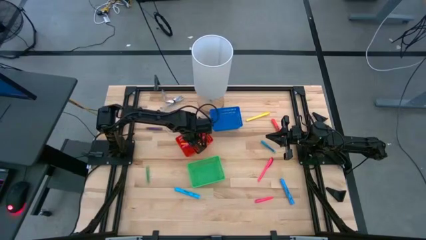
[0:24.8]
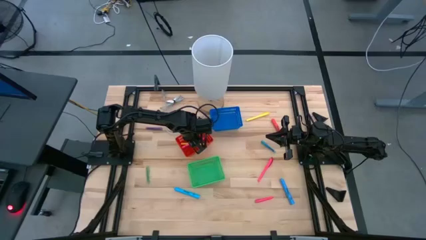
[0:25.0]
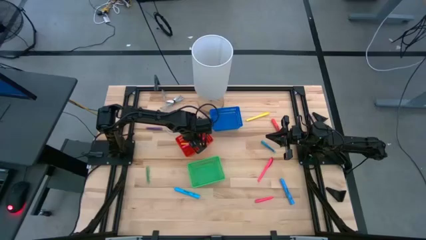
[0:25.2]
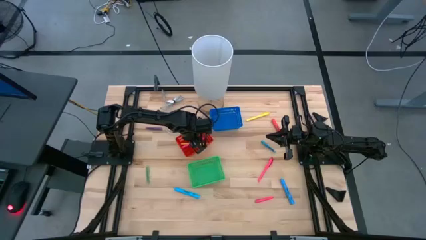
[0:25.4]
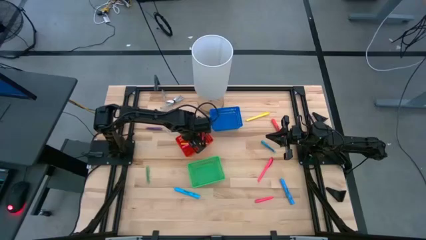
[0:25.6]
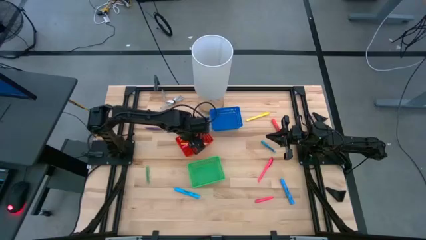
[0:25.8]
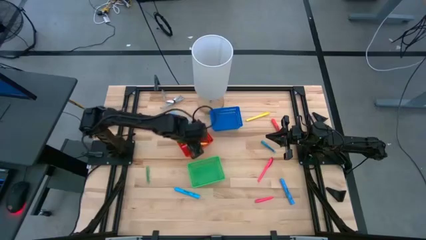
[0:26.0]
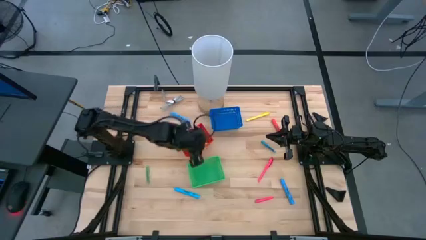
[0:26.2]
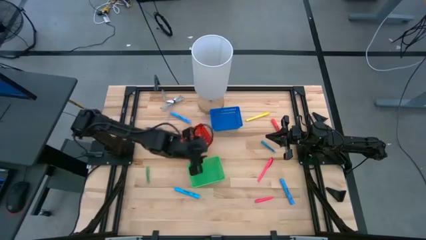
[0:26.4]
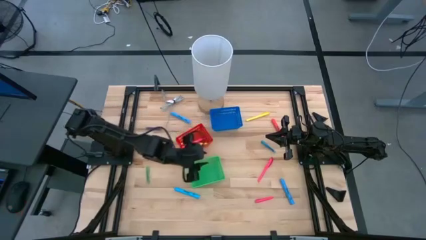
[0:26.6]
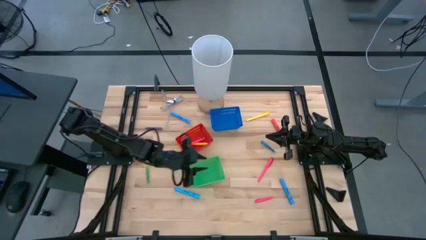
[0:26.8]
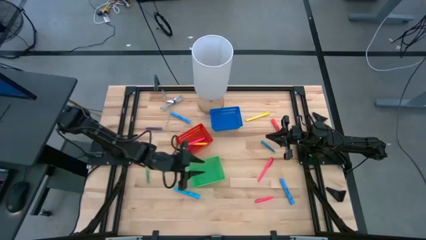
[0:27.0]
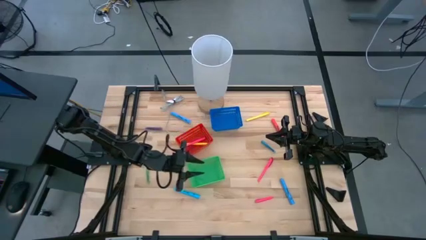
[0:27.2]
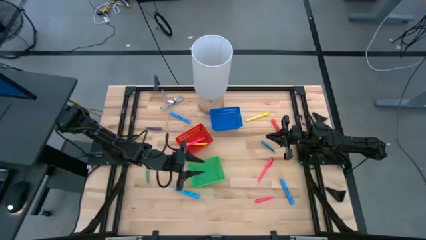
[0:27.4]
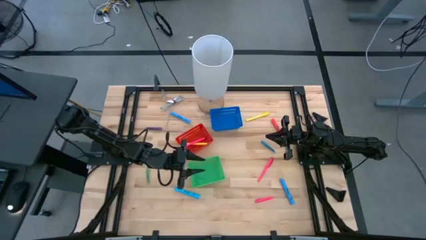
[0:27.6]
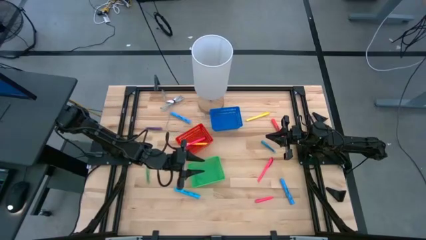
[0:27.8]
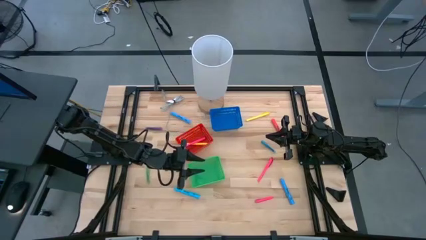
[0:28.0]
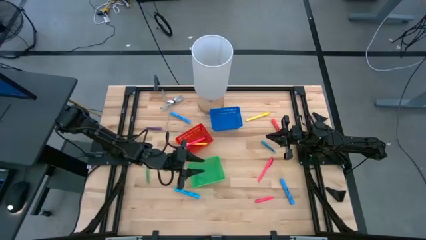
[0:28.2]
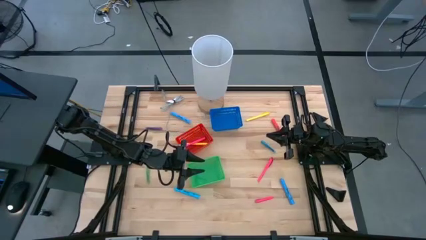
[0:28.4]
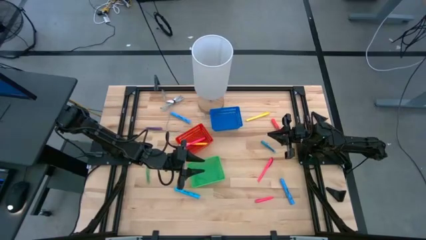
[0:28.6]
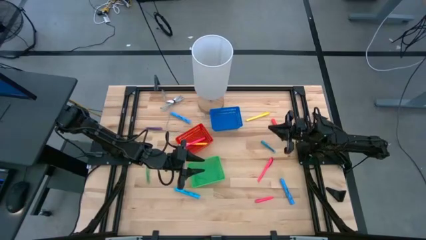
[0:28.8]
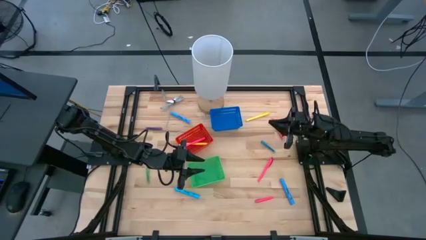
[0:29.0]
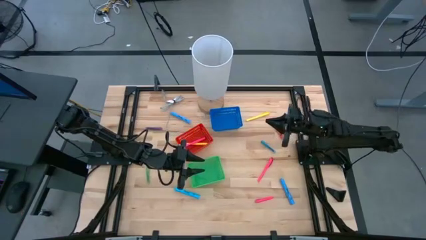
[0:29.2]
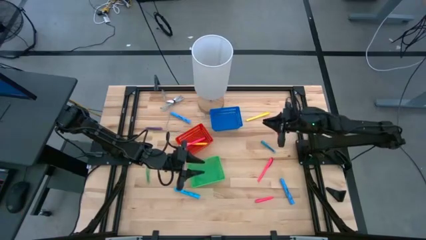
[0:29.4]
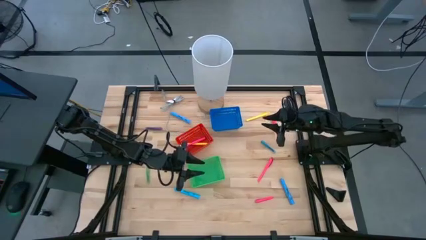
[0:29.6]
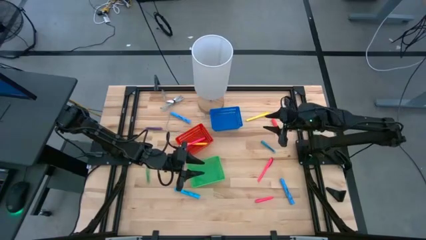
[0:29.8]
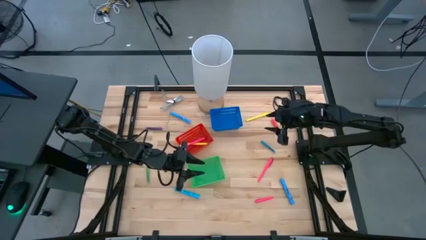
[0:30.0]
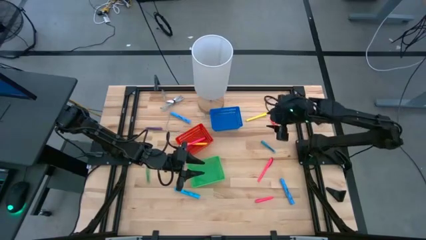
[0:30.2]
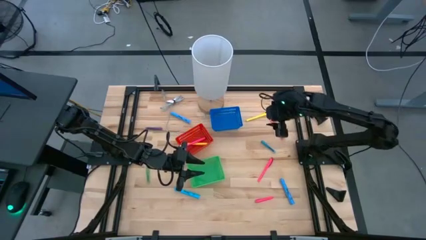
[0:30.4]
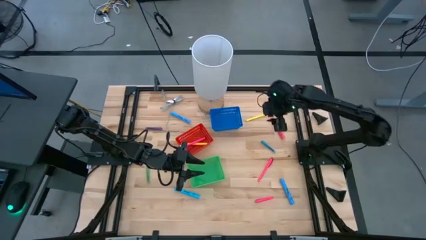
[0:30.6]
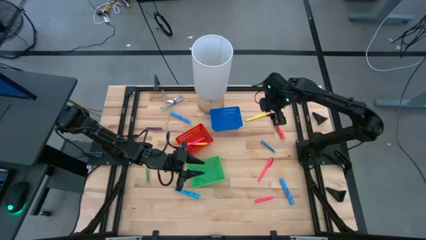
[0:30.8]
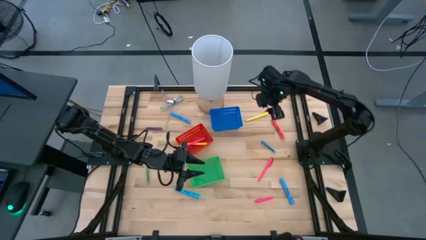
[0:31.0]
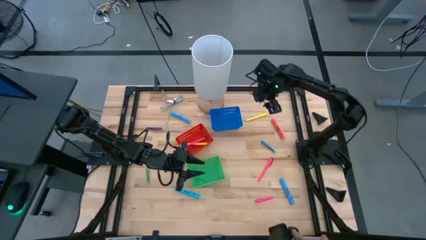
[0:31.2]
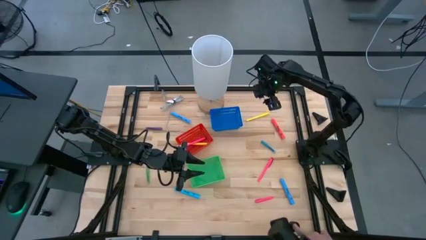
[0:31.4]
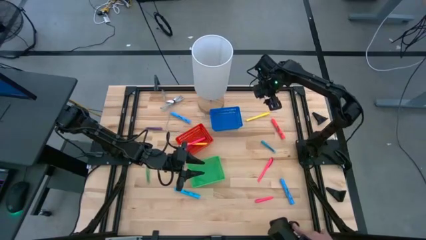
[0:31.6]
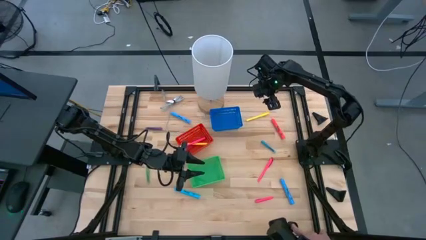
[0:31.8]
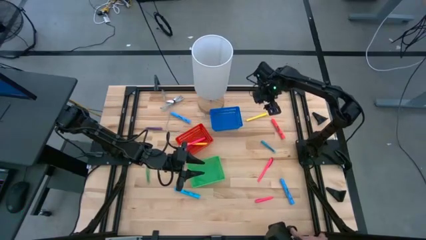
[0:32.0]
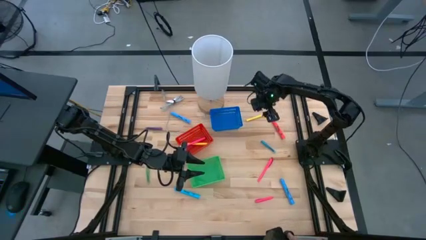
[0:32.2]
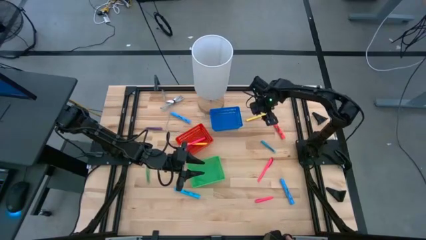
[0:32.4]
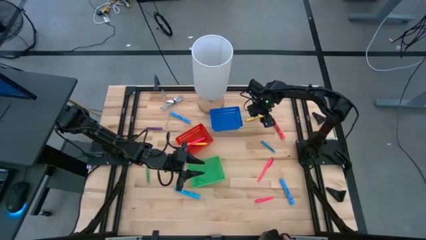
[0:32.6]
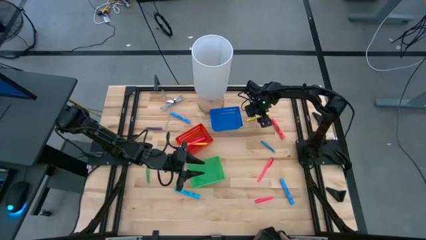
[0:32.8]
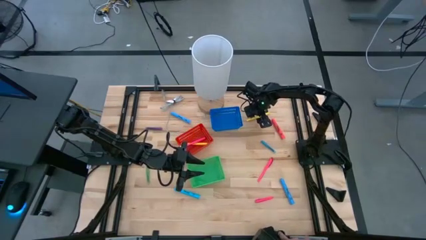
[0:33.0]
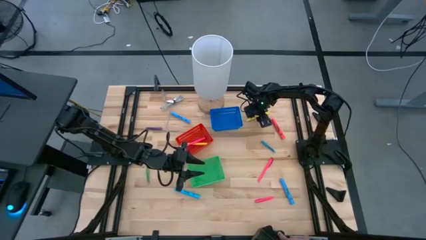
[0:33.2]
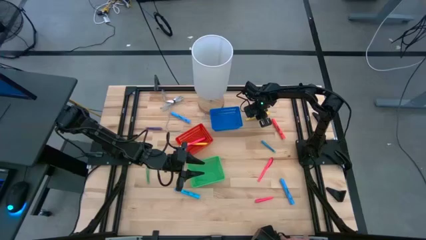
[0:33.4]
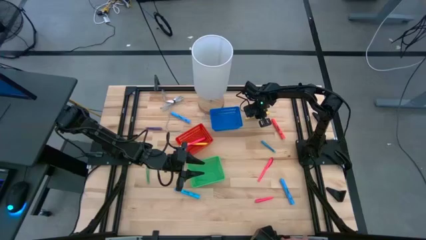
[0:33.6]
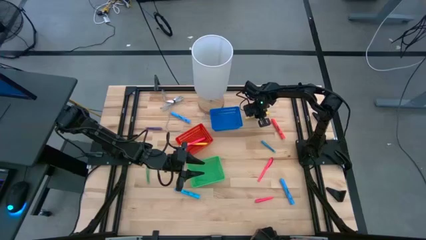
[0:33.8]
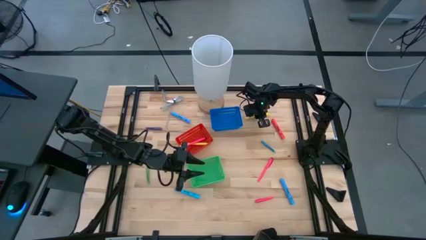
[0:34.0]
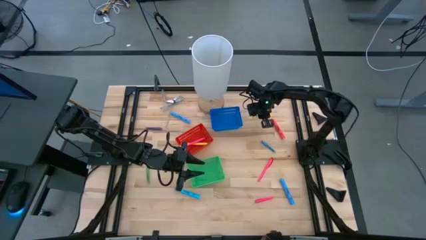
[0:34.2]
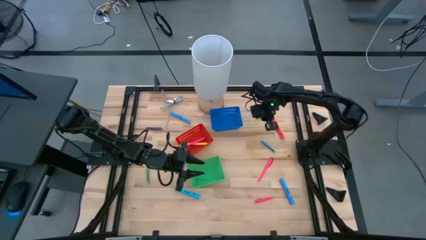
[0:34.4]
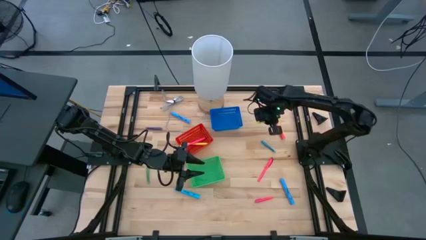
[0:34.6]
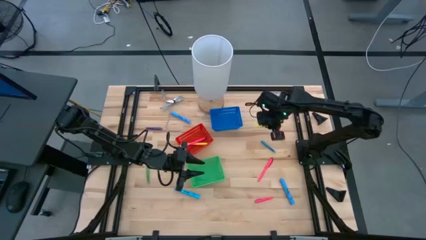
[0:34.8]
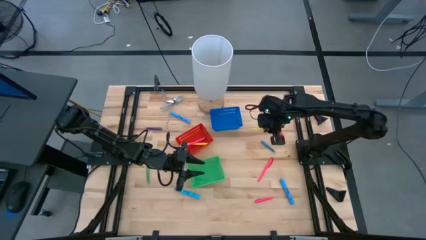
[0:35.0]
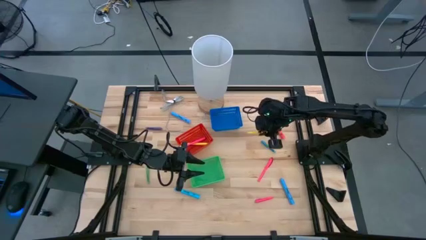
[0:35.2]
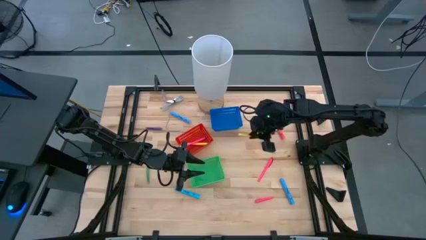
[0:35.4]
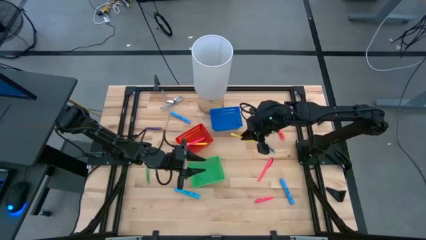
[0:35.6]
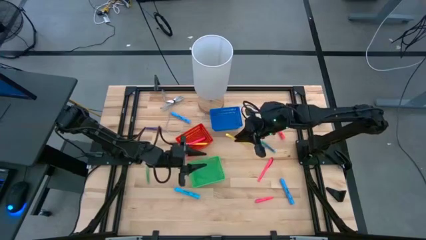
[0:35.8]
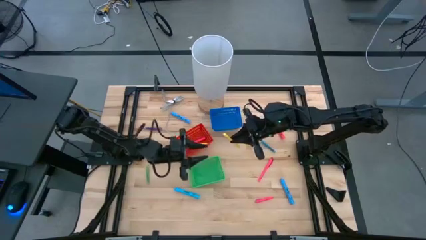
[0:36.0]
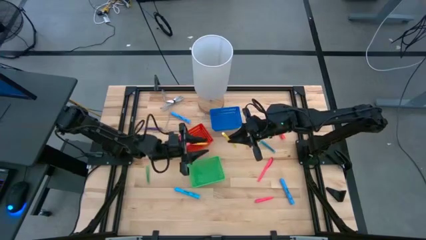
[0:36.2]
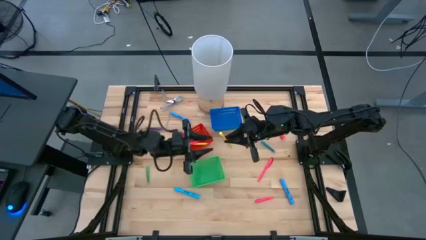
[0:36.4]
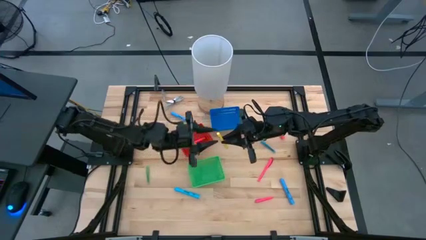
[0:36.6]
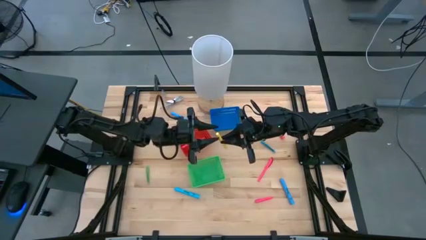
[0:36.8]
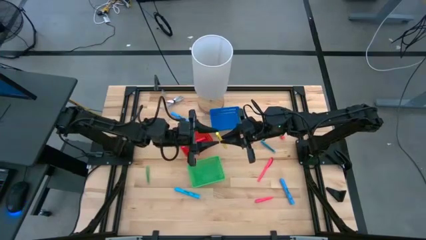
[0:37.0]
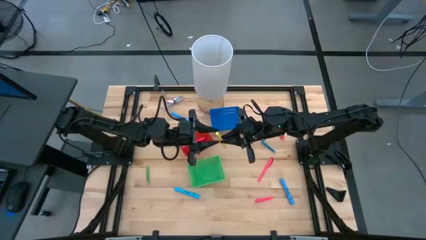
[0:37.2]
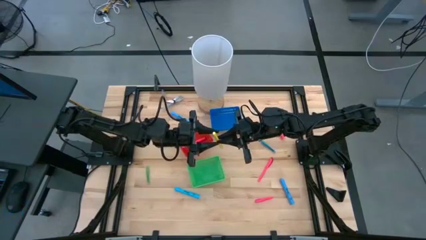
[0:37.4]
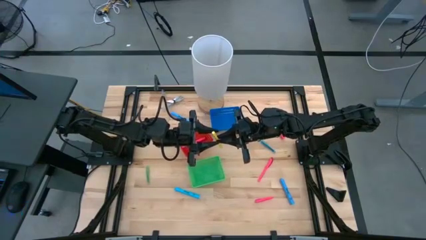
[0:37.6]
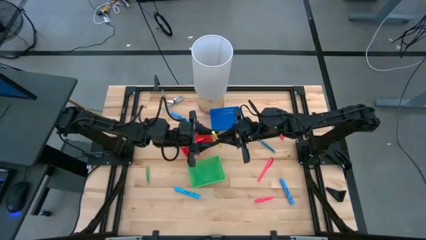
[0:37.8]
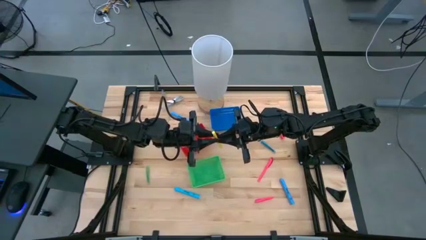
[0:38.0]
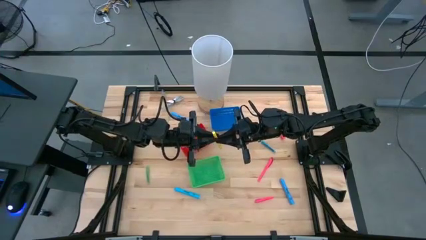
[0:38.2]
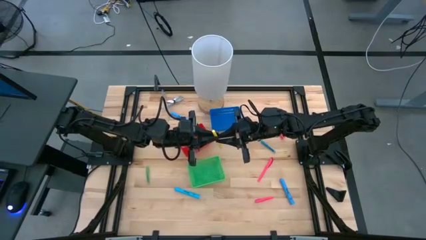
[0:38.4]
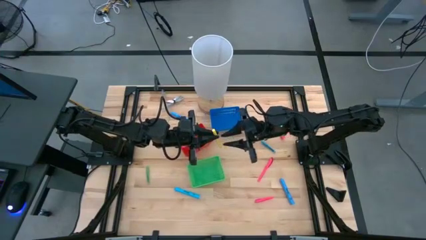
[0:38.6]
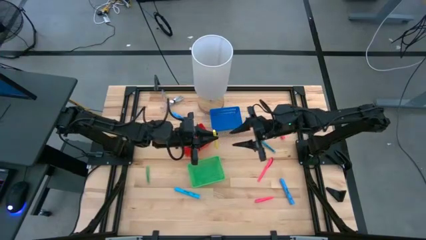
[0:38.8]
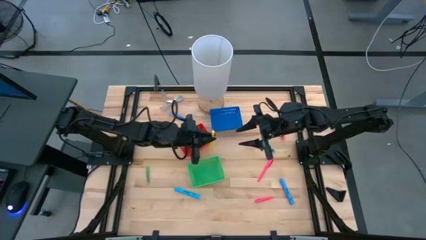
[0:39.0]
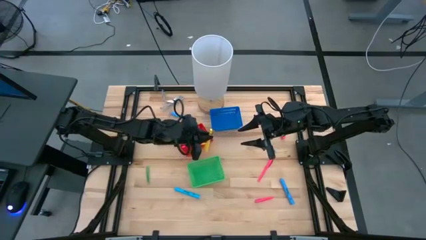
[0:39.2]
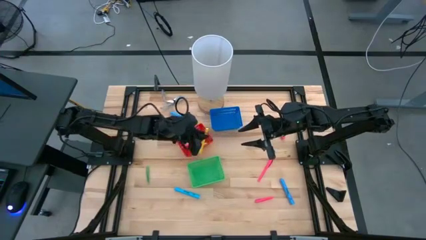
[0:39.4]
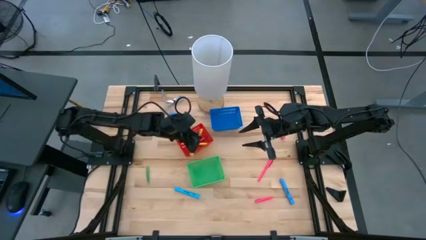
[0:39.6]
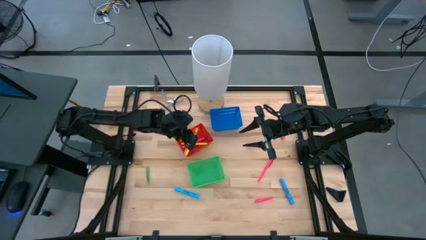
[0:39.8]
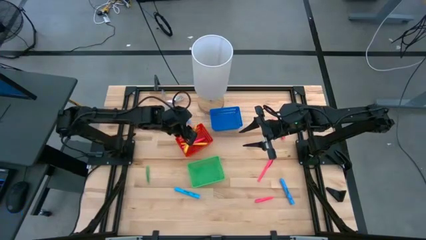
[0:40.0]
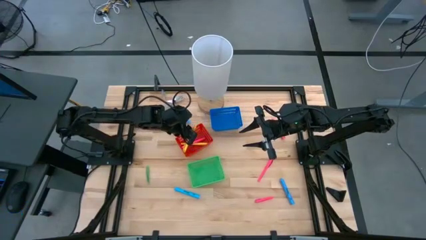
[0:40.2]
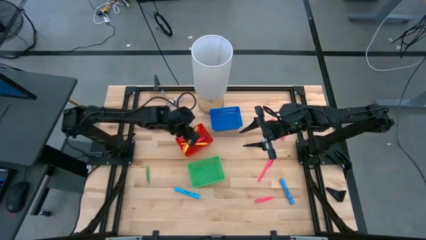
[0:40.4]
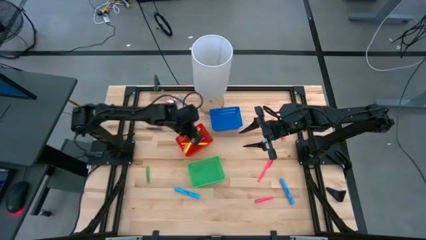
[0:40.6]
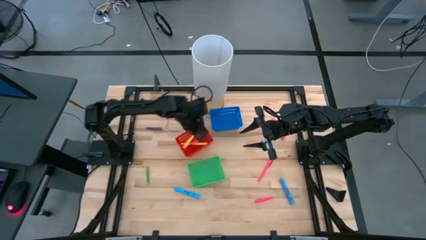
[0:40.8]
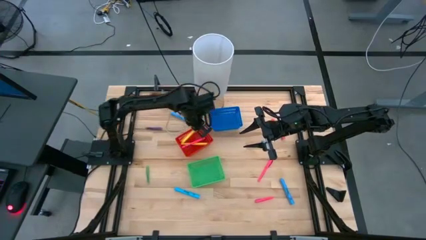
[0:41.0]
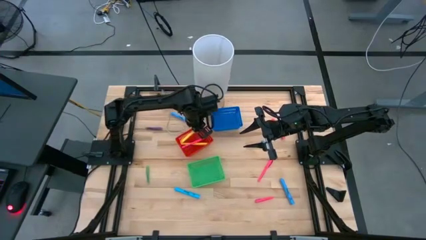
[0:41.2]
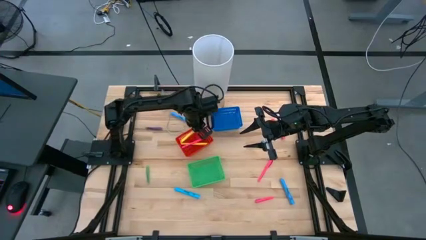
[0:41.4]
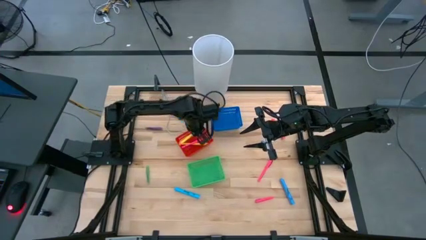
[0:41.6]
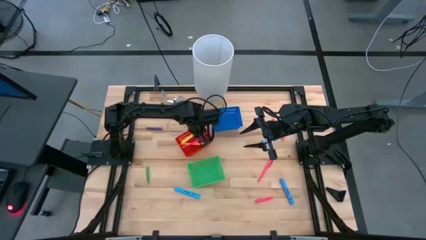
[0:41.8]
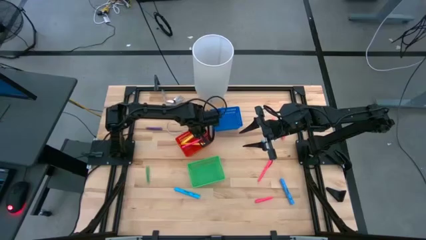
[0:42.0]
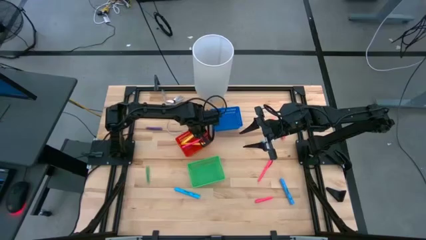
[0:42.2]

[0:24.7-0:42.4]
Task: Pick & Place Markers
Put the yellow marker into the red bin
